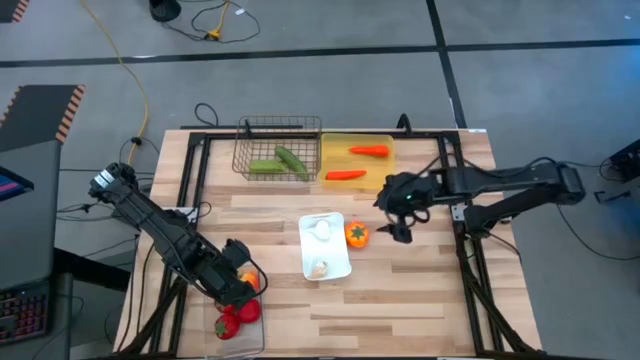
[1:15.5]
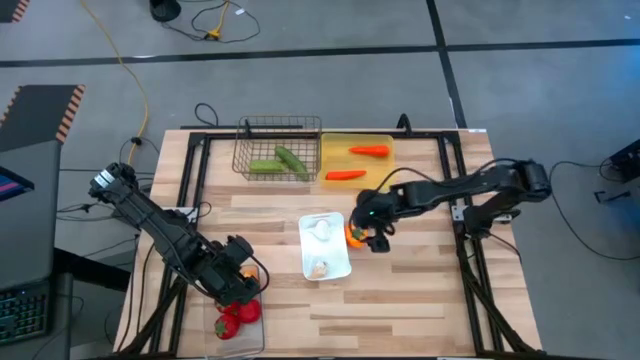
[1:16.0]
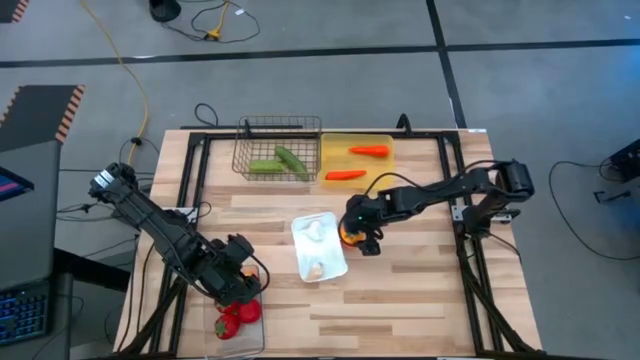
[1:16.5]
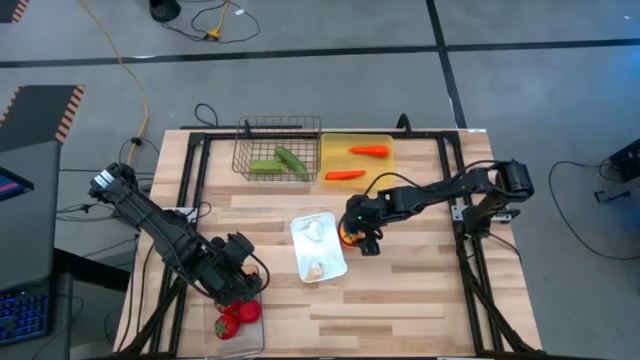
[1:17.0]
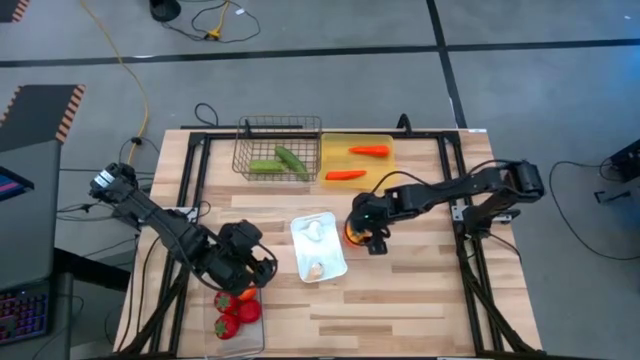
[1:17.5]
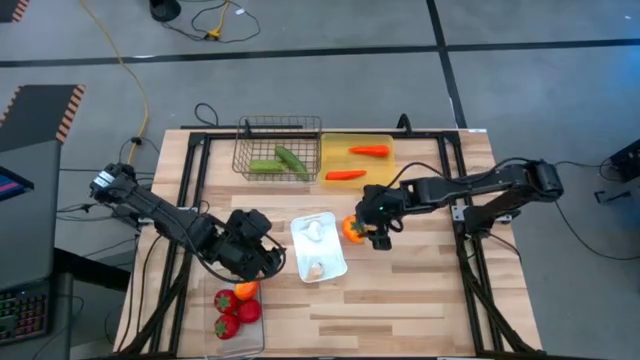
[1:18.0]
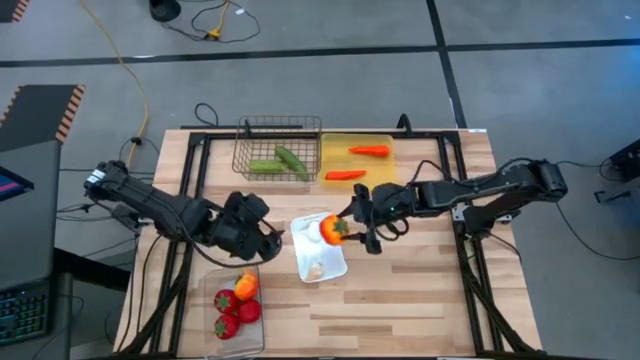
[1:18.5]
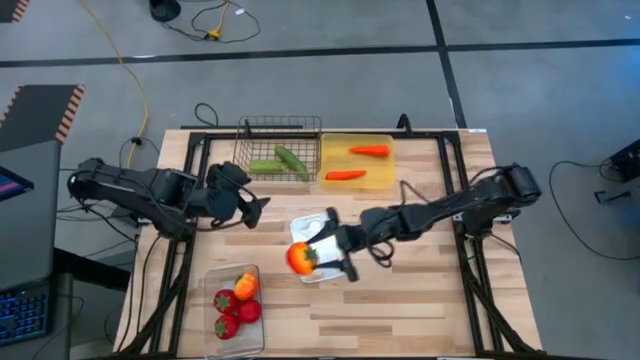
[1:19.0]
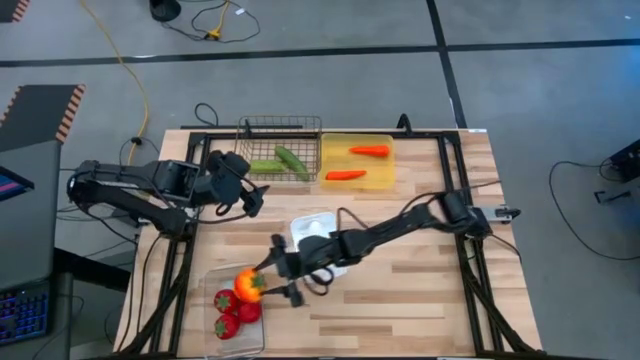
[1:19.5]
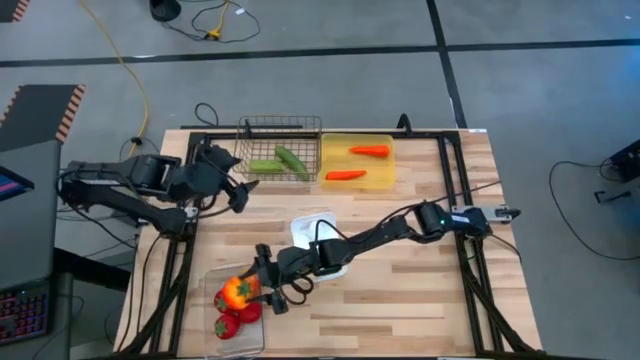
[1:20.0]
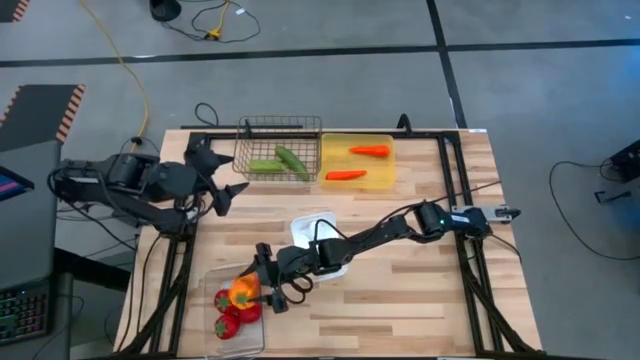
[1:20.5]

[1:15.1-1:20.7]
Task: Sort produce into baskets
Put the orange tomato into the transparent bin

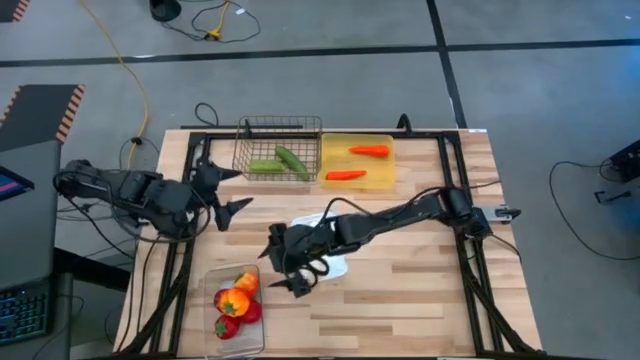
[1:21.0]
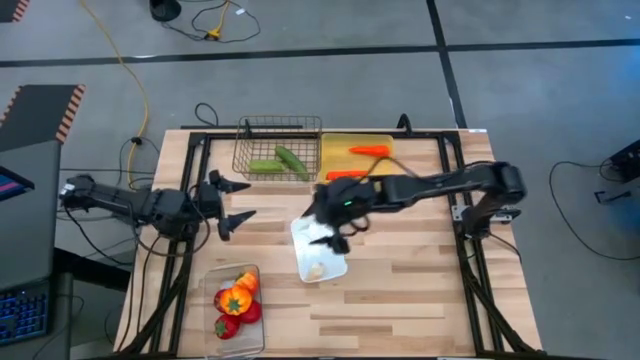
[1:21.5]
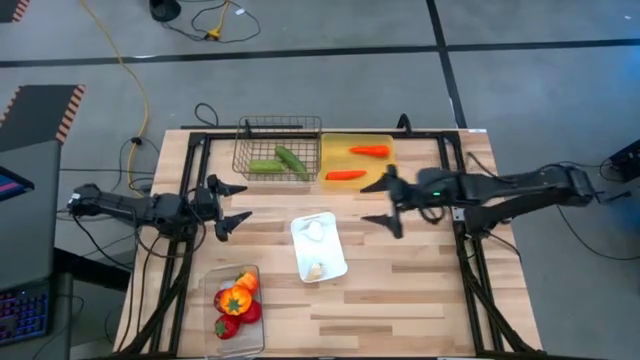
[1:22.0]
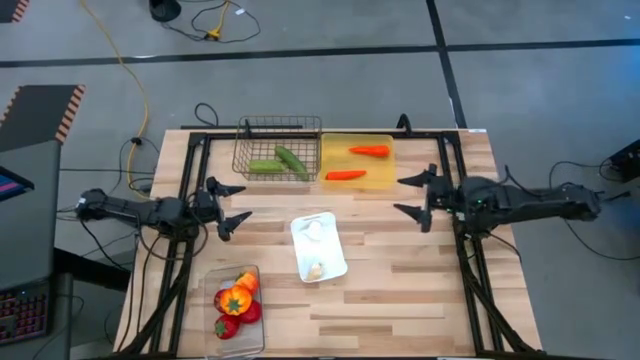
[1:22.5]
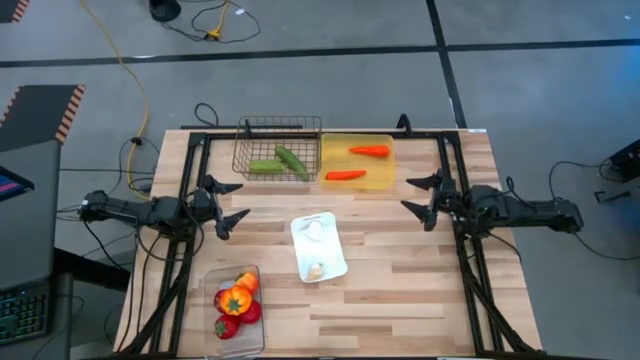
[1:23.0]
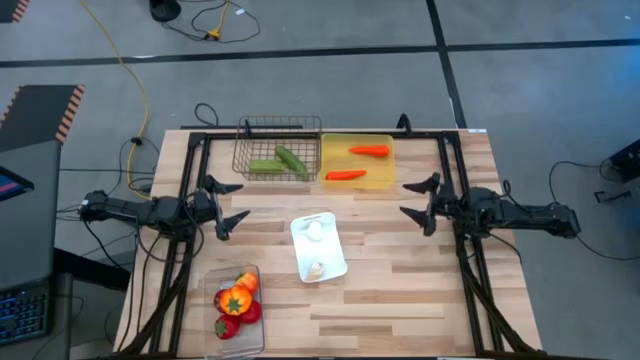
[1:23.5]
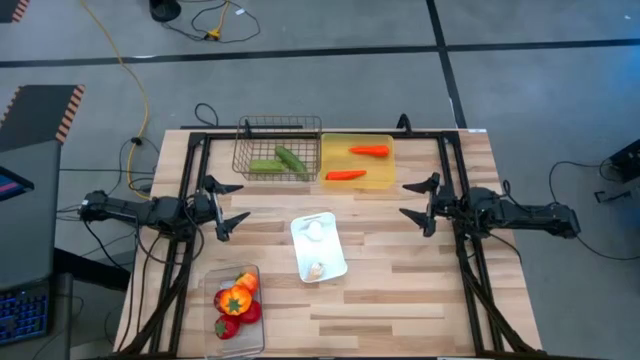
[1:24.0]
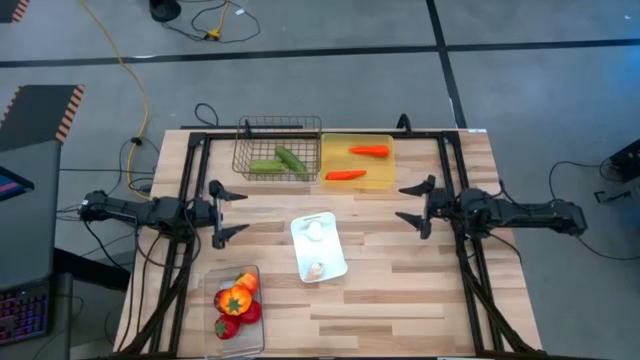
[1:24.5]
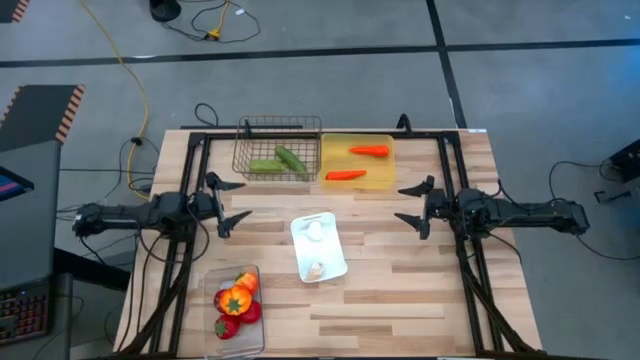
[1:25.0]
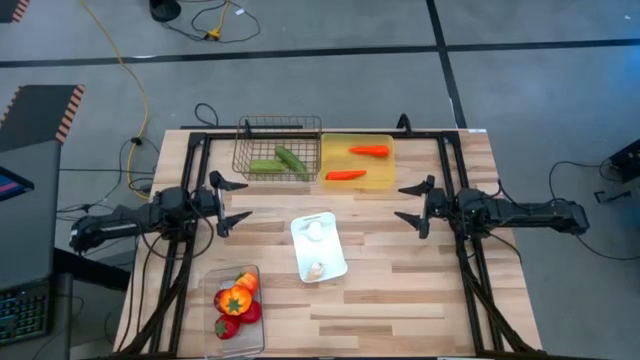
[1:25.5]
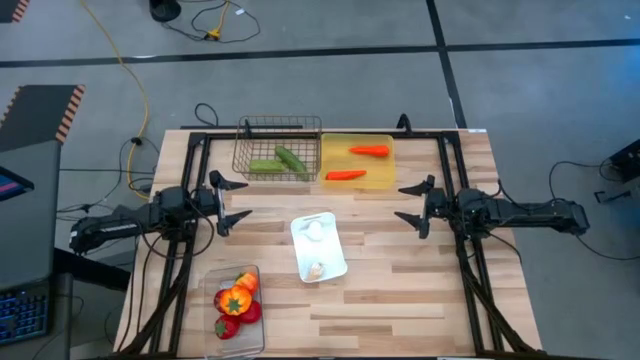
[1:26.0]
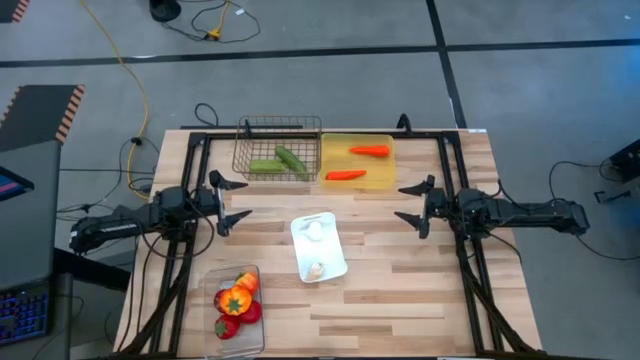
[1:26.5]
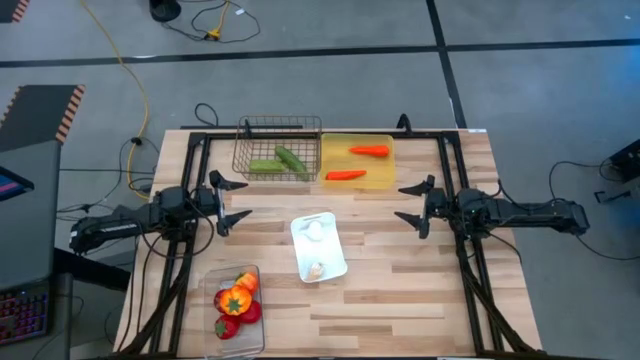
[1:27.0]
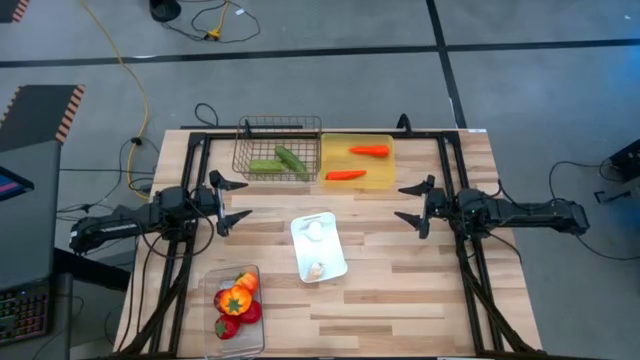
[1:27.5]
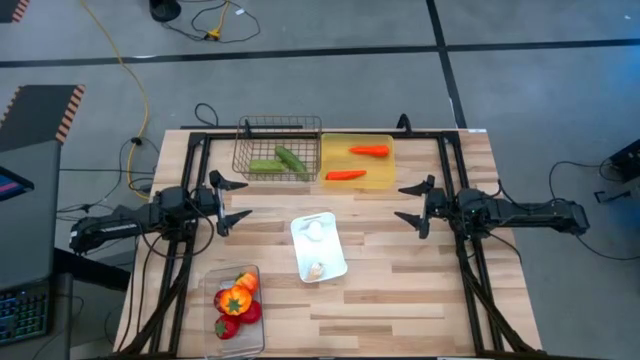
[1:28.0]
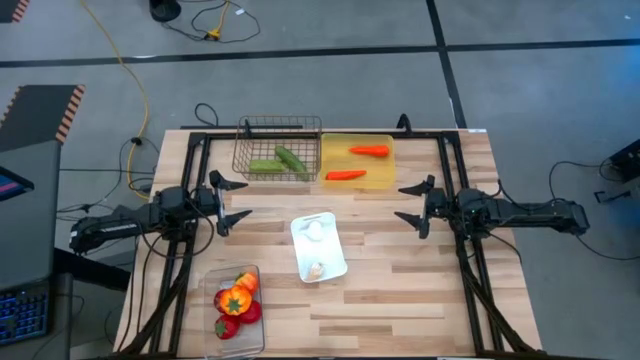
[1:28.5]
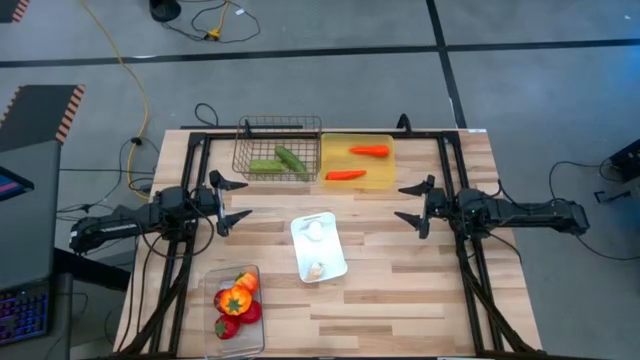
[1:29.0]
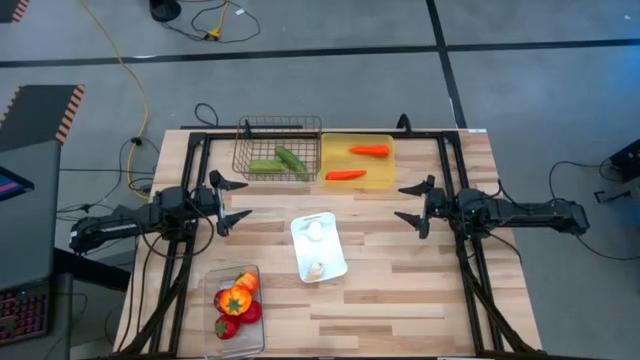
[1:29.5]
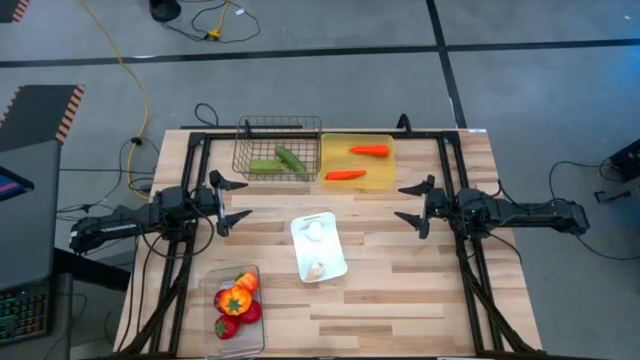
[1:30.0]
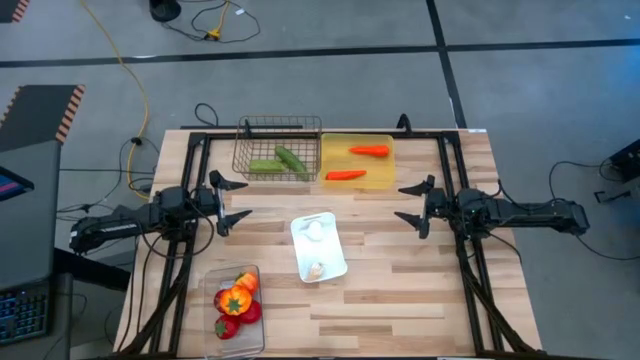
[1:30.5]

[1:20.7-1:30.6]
Return to Home Position

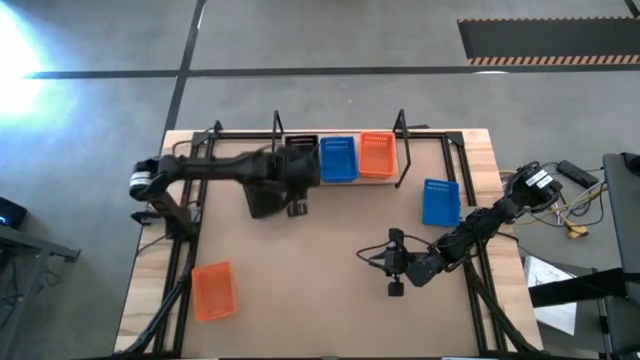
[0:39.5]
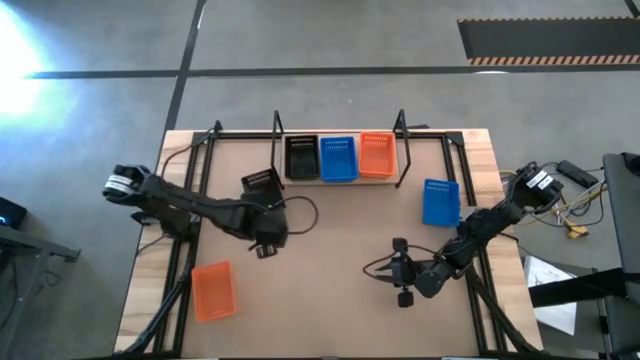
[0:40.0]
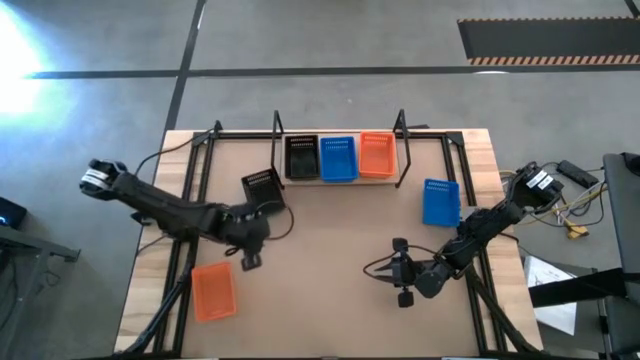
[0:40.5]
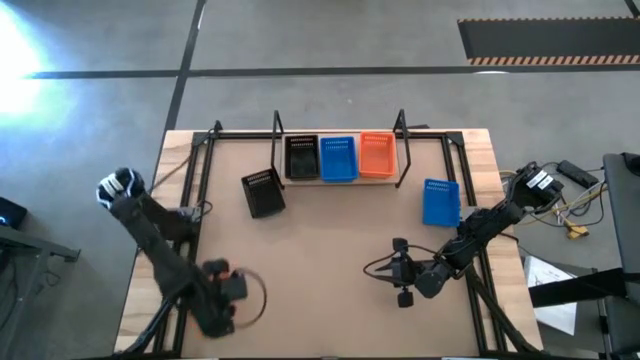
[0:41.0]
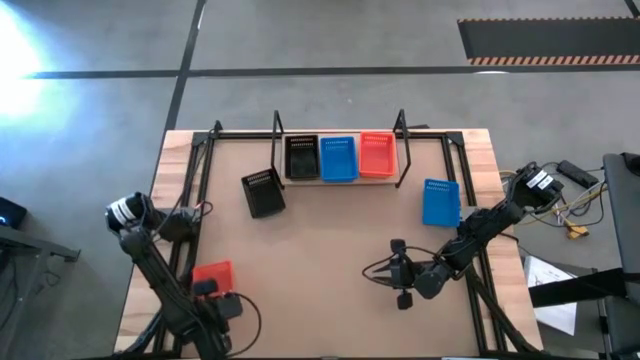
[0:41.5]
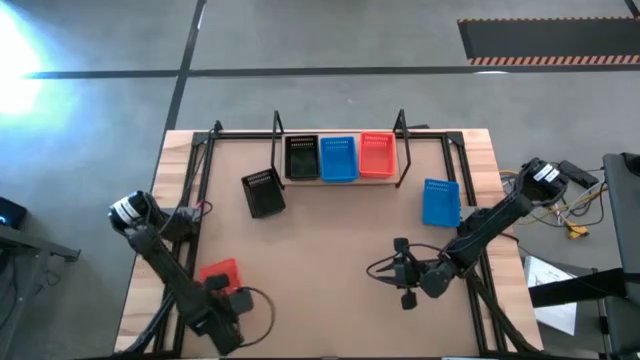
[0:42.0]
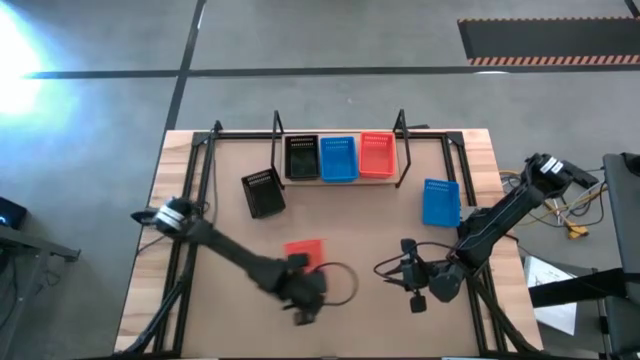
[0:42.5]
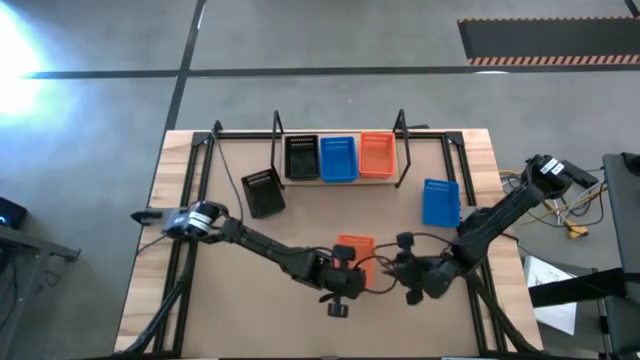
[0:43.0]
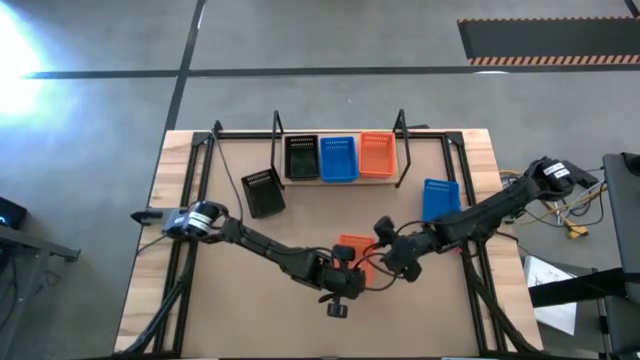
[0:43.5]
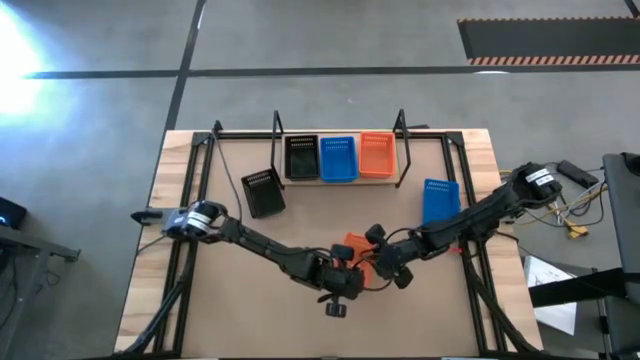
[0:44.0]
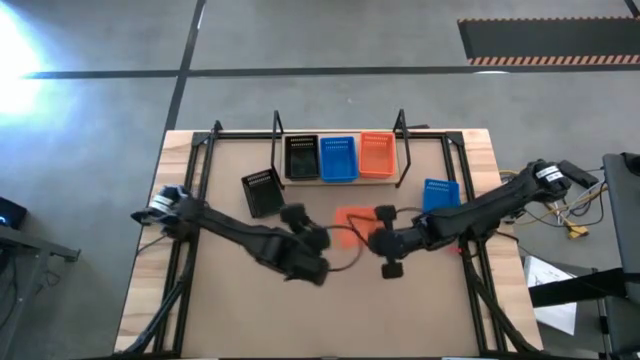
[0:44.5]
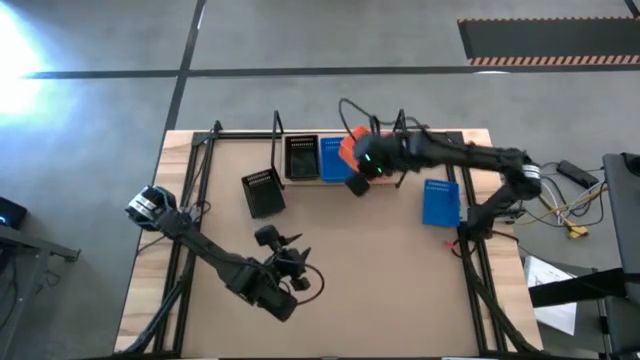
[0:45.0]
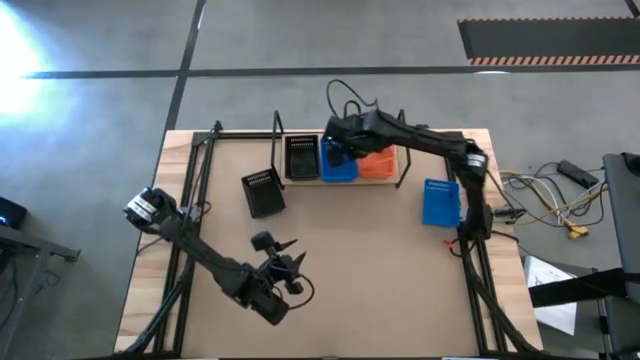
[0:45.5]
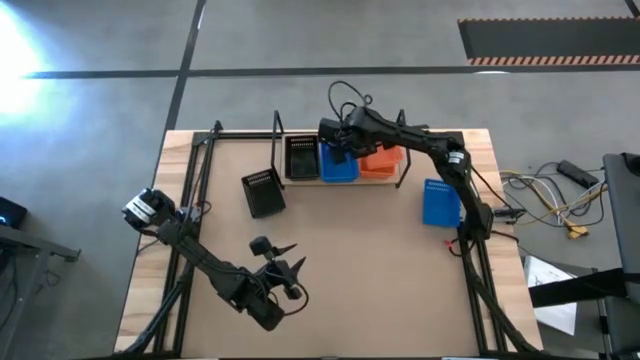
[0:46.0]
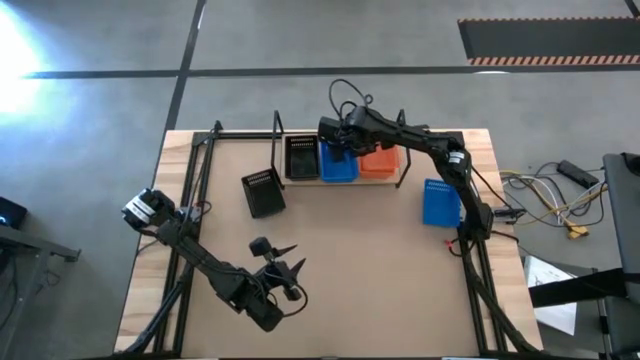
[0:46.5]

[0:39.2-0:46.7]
Task: Stack baskets on shelf by color
Stack the orange bin on the orange bin on the shelf
